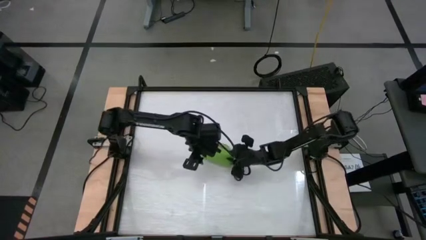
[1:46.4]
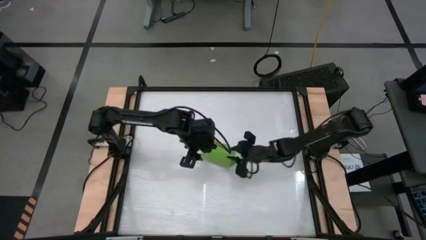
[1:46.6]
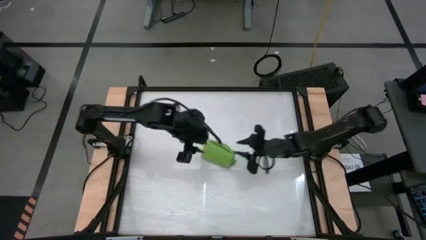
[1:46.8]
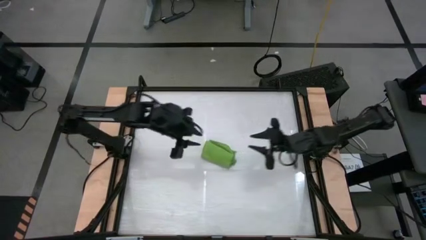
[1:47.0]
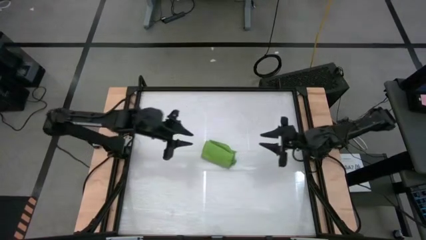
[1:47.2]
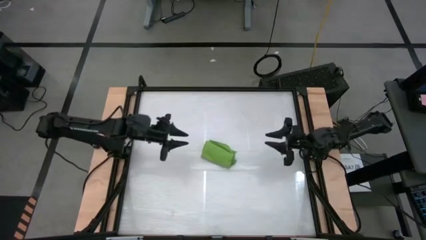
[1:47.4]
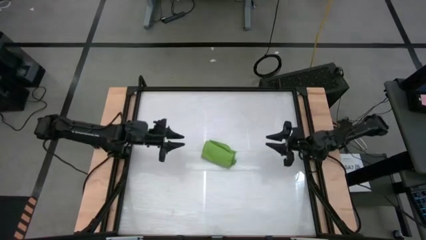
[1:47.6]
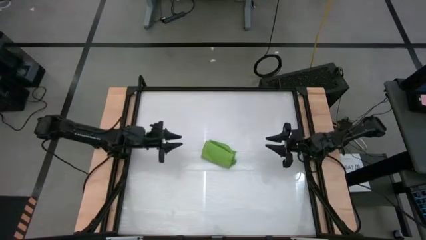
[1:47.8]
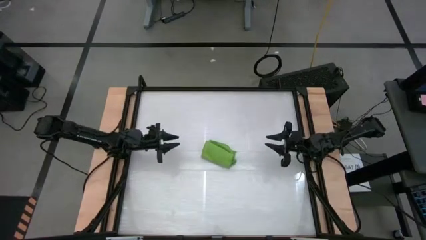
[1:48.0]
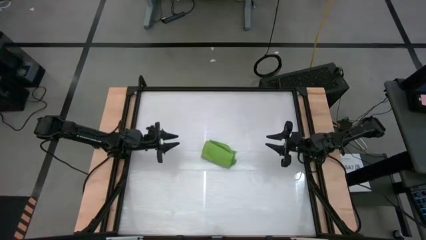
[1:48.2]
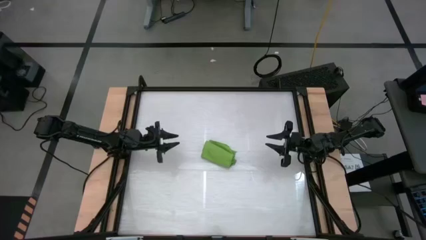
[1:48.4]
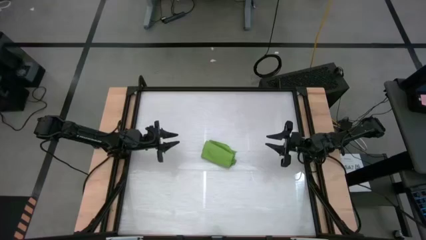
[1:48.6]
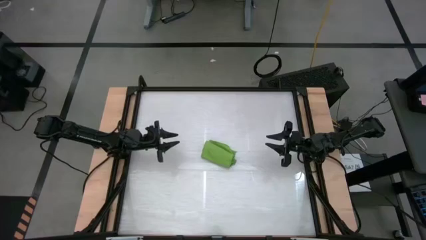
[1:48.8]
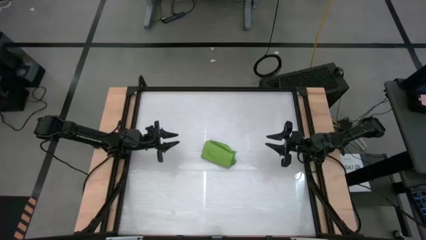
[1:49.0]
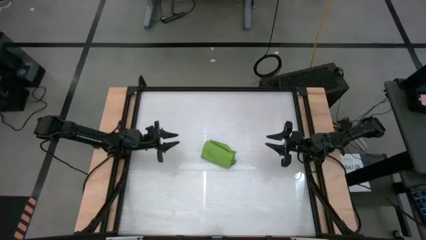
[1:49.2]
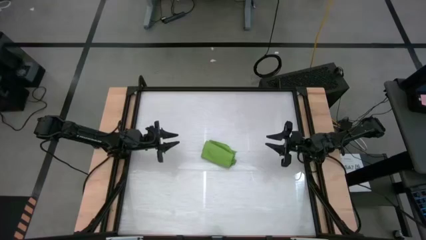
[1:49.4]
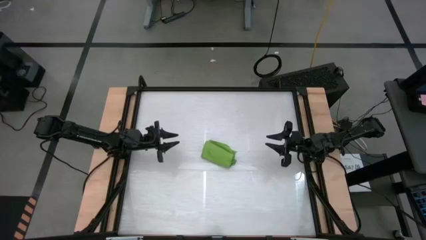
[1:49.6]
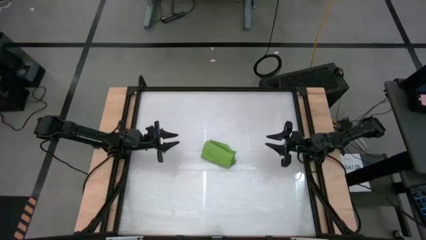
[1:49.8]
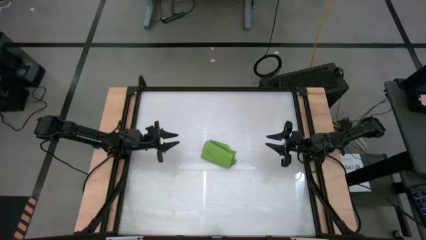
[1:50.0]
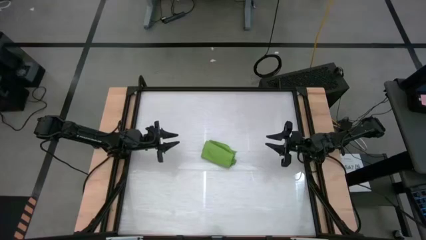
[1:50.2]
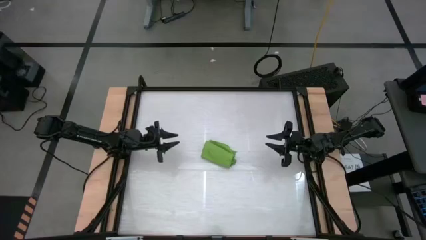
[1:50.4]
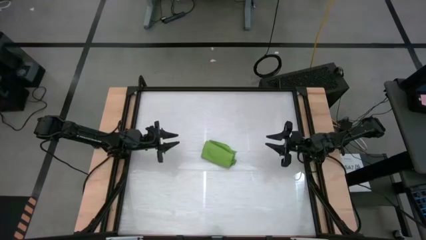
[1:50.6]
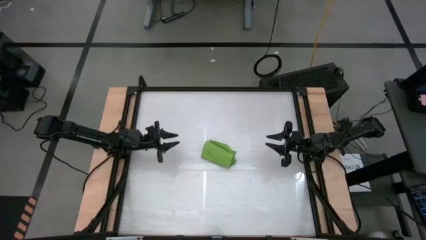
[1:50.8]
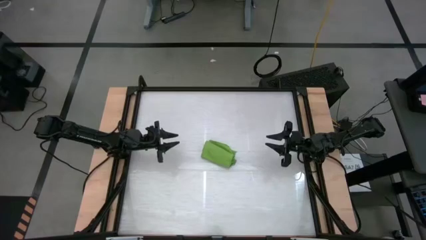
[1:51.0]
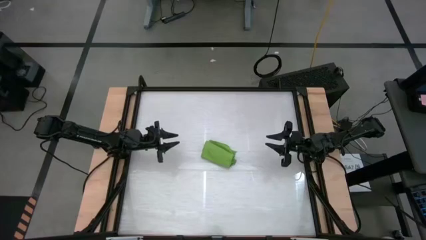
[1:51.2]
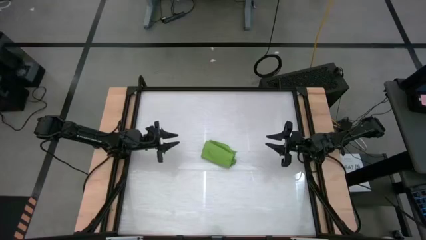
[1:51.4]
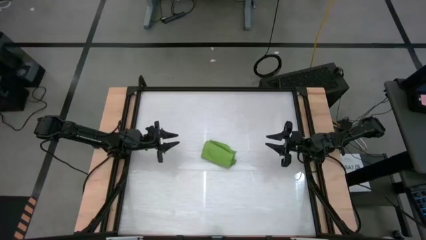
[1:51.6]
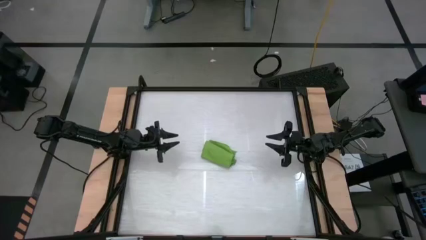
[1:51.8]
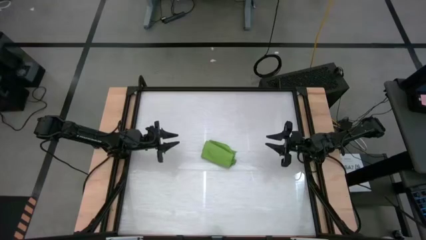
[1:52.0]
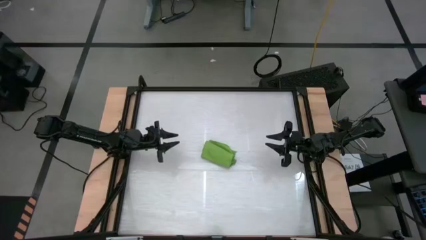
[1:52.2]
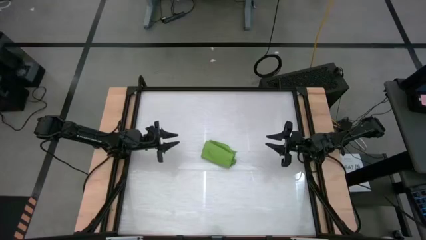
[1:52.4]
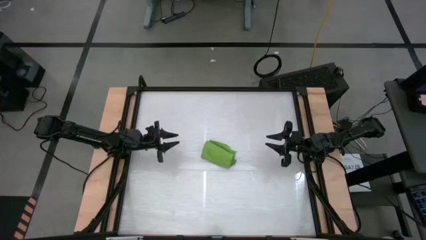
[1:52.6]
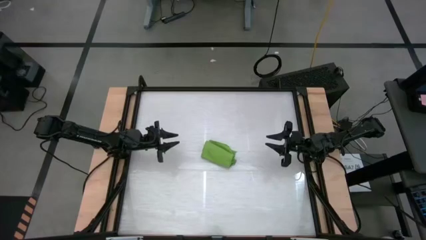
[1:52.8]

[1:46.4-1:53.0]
Task: Roll towel into tight, uniform cylinder
Return to Home Position

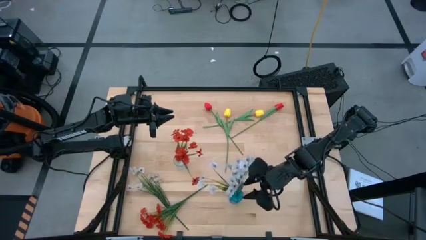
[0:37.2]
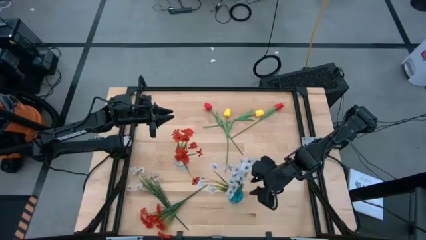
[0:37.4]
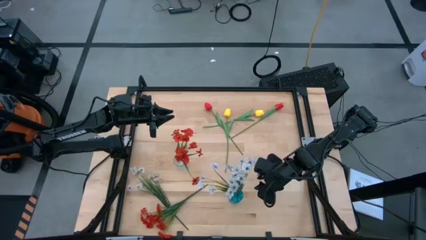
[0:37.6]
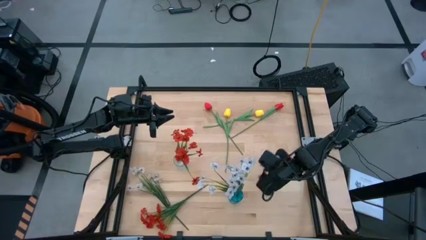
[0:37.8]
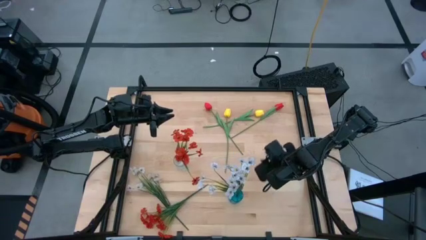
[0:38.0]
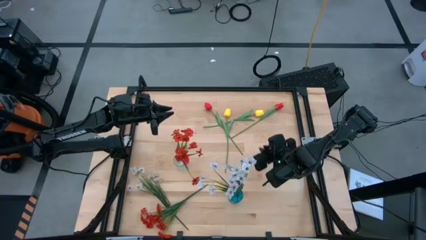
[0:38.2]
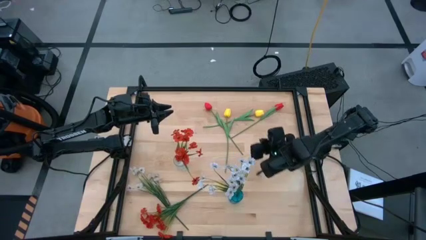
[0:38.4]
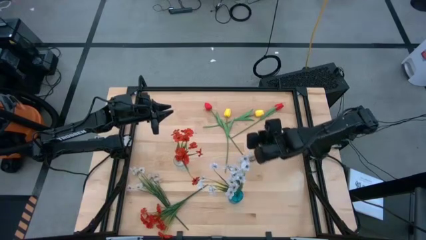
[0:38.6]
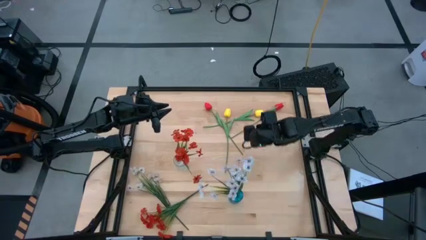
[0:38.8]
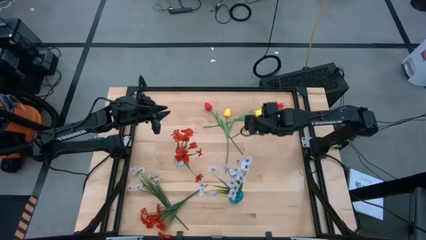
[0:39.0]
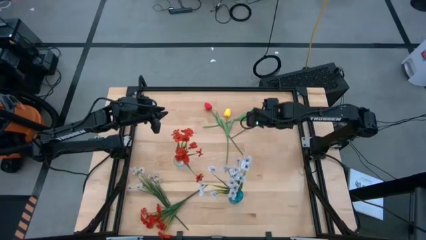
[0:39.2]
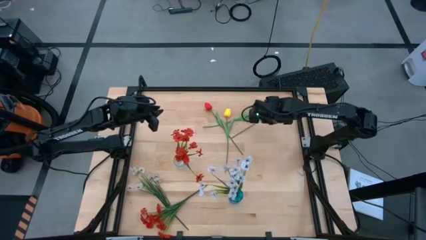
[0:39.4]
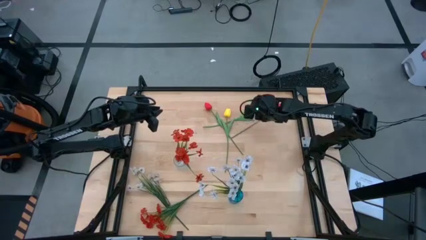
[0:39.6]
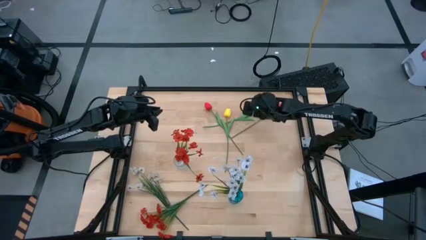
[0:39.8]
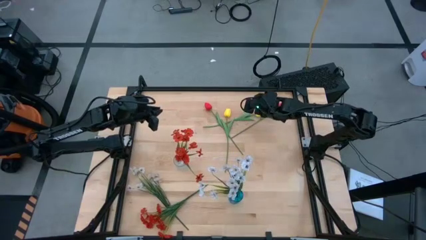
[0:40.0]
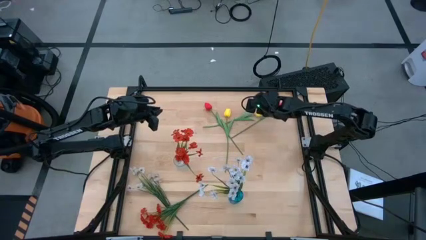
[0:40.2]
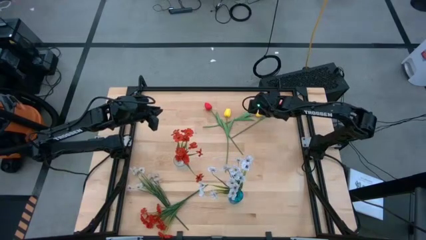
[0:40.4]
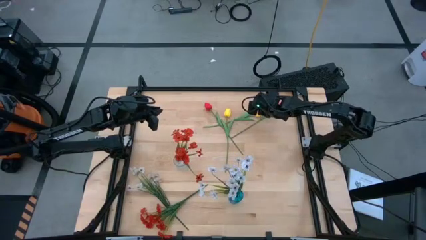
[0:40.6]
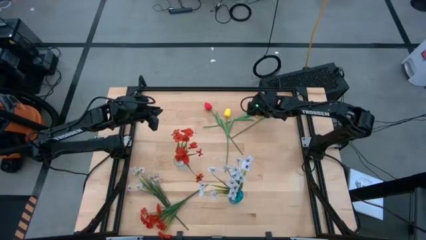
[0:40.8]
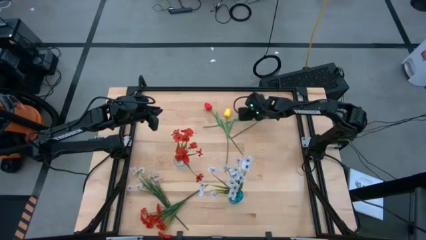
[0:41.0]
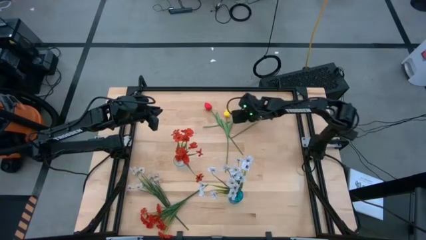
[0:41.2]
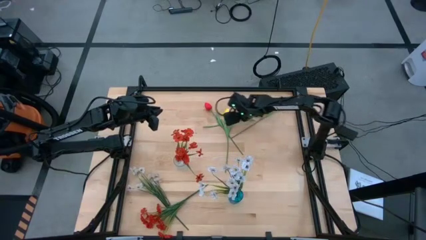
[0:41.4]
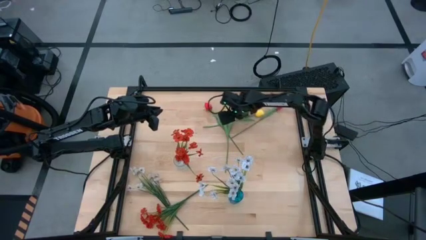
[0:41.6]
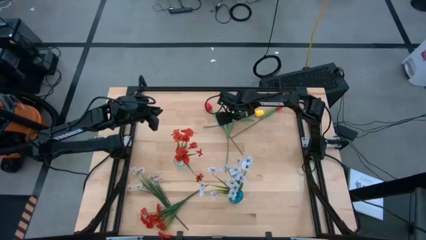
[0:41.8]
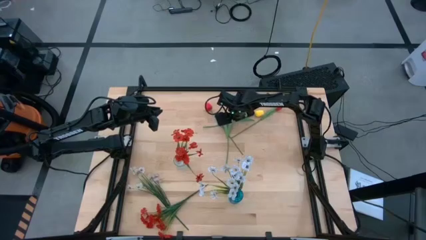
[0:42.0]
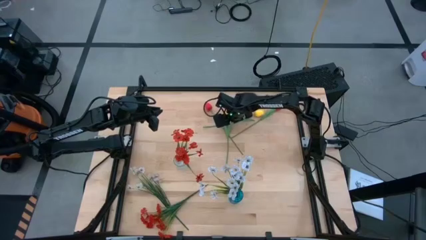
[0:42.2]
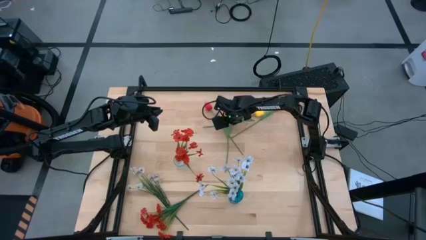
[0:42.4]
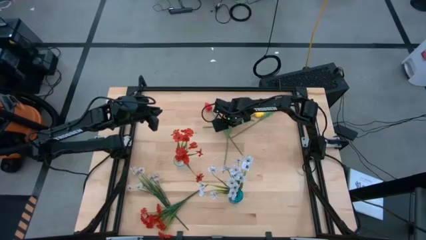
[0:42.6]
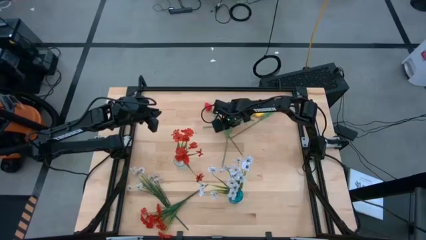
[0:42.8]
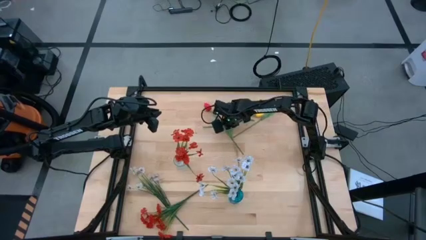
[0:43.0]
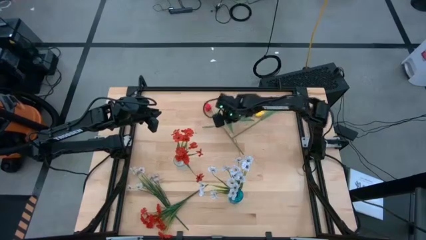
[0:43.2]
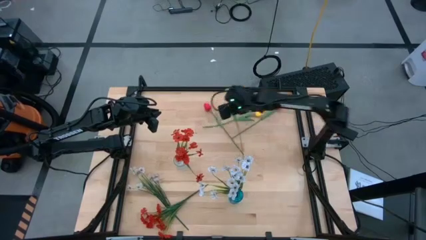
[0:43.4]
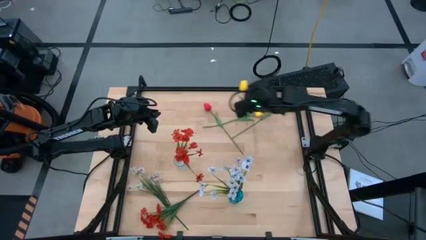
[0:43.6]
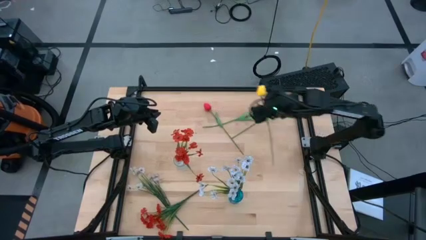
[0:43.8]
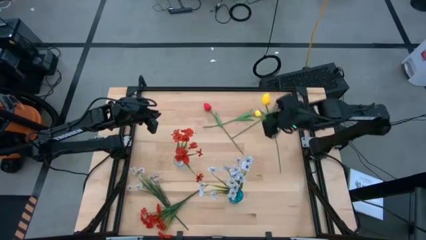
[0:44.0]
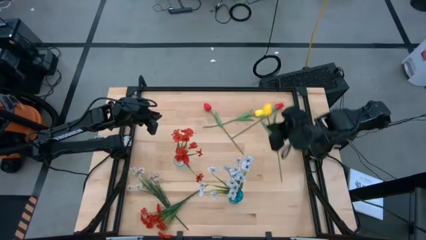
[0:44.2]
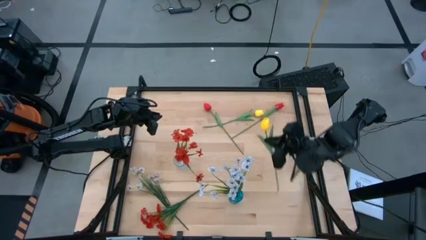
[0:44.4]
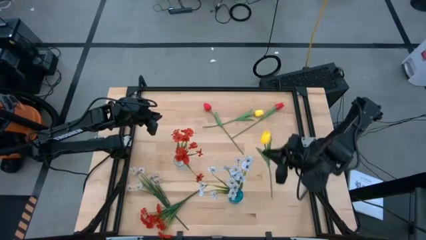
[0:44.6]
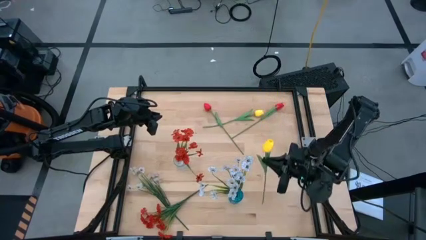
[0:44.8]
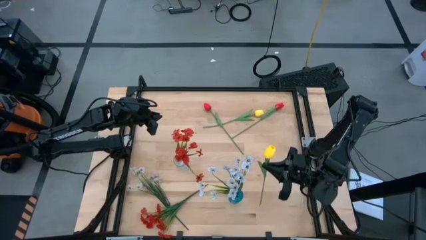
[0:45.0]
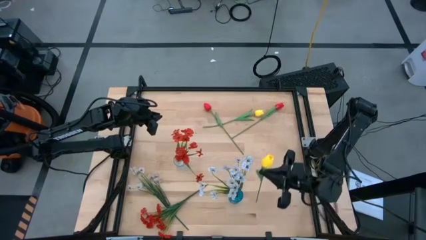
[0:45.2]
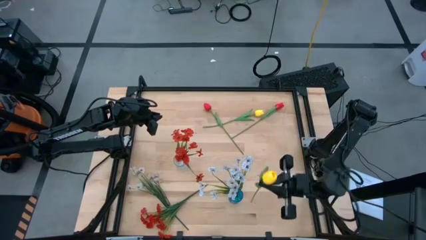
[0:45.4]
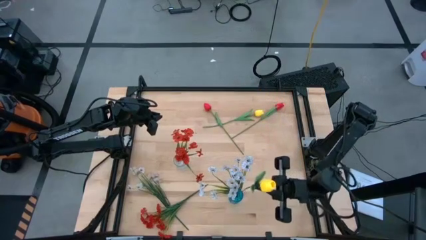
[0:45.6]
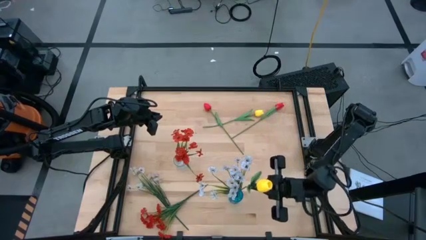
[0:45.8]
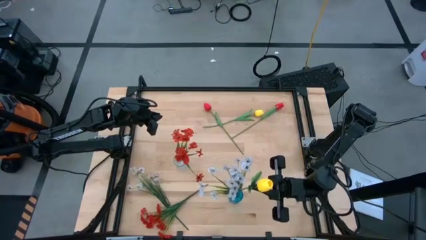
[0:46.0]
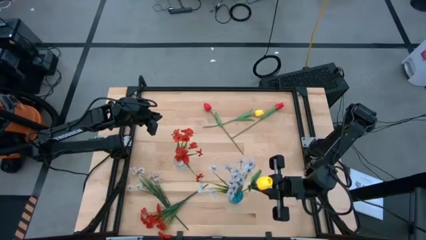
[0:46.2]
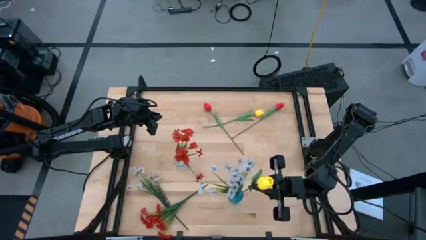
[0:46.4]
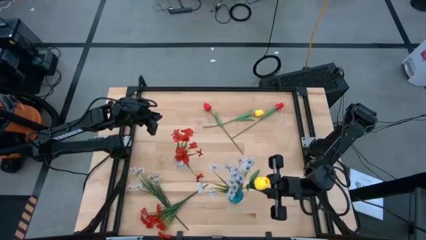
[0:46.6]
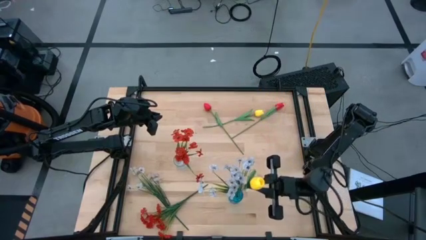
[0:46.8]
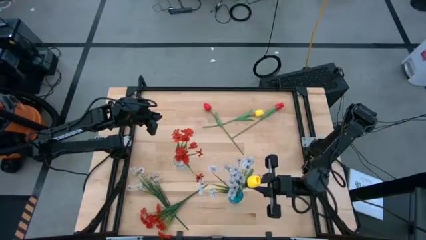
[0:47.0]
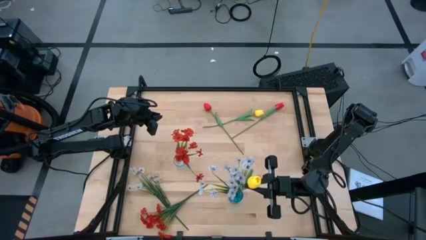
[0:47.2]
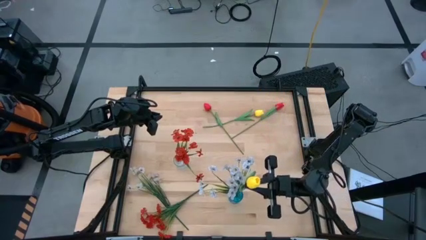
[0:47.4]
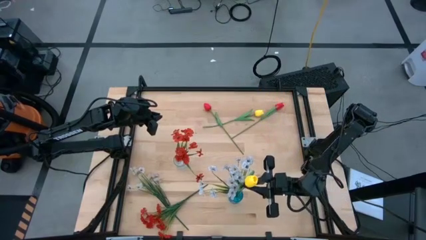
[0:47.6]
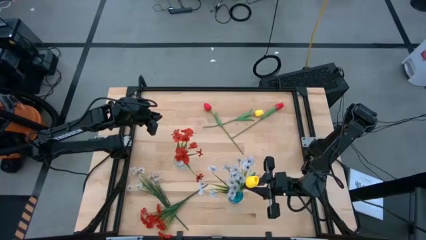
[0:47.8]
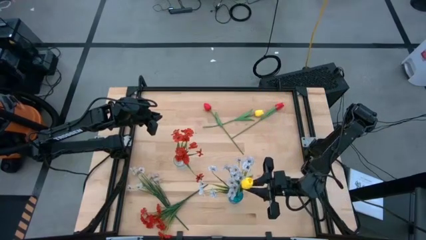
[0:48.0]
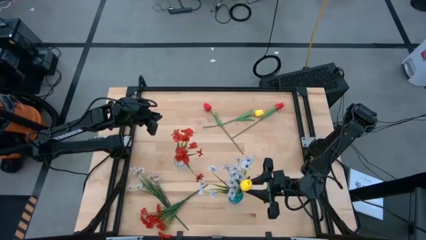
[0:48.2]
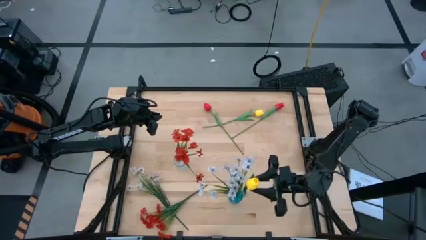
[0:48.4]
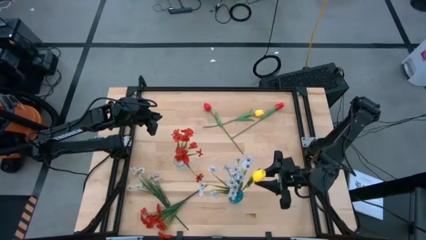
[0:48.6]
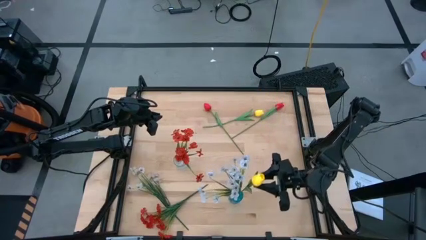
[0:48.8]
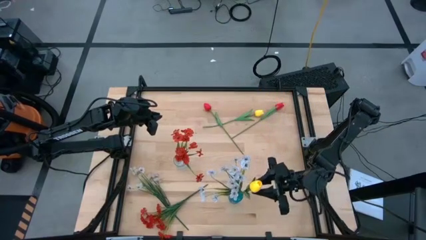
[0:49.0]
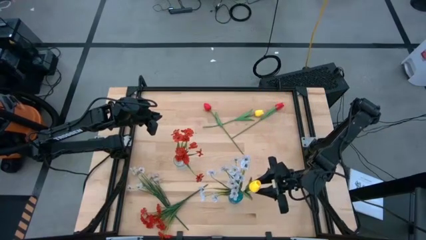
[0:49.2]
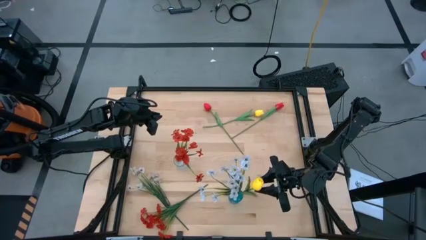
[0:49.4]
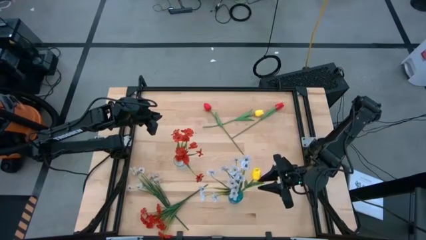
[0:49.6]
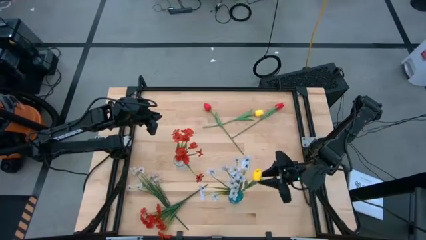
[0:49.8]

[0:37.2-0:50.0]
Task: Sort flowers into vase by color
Put the left yellow tulip into the blue vase
